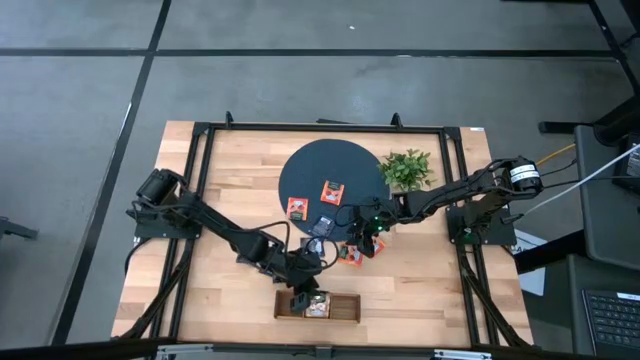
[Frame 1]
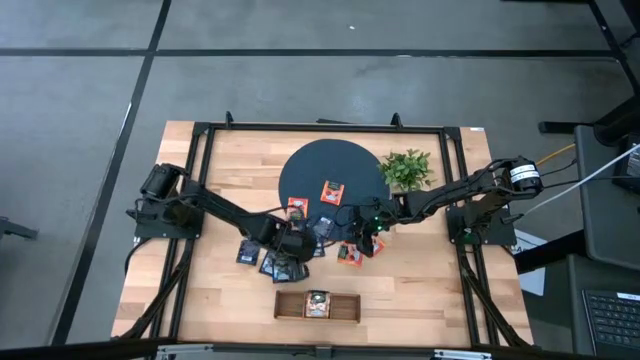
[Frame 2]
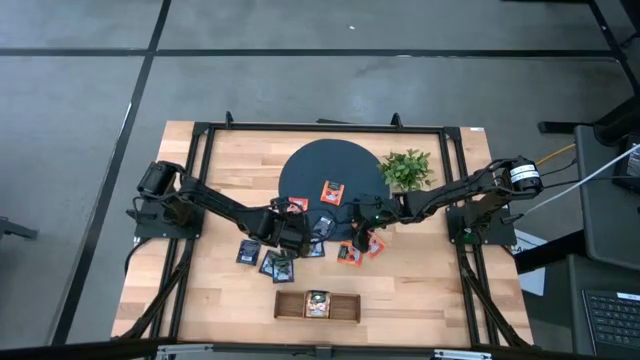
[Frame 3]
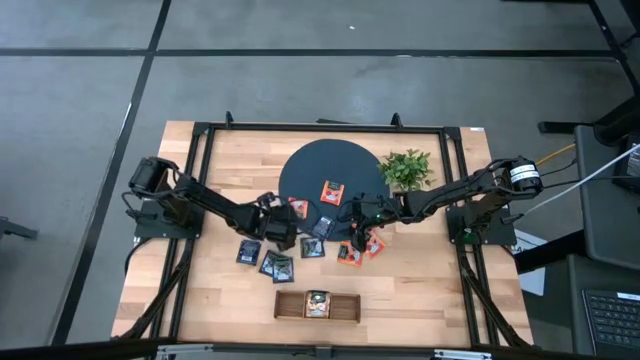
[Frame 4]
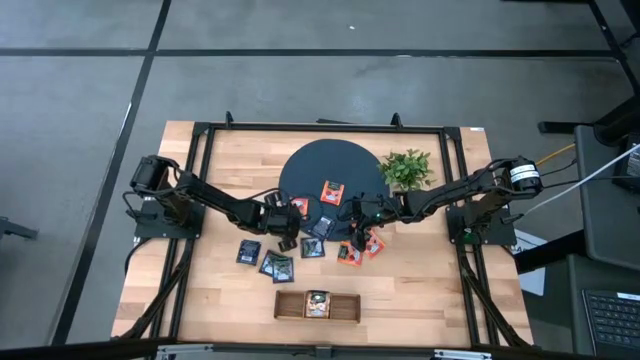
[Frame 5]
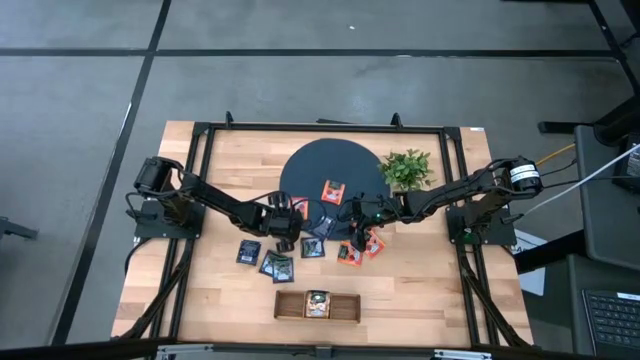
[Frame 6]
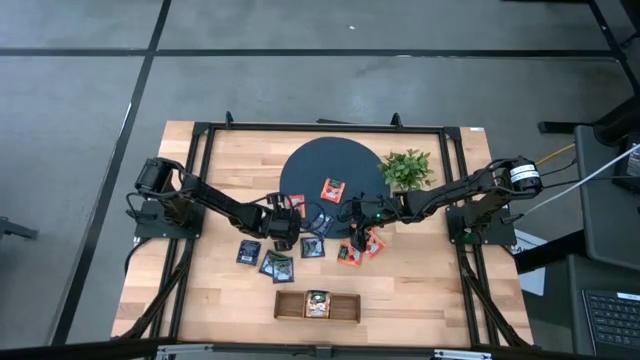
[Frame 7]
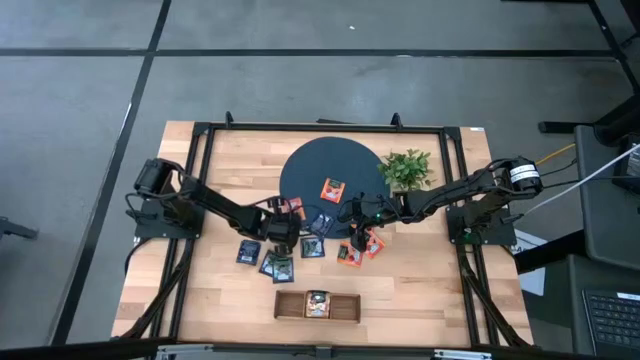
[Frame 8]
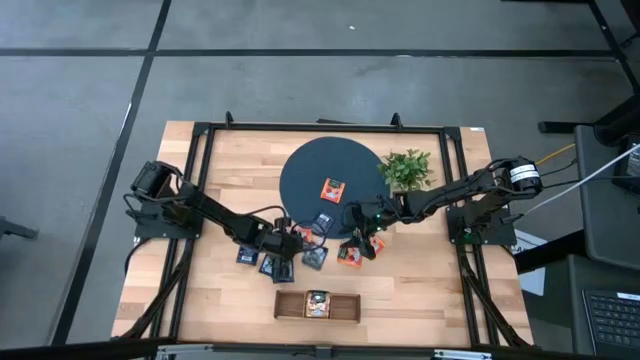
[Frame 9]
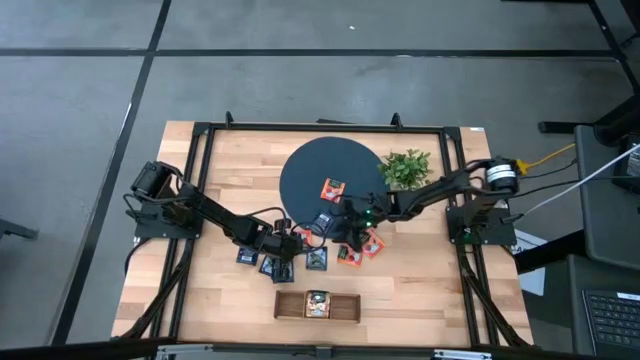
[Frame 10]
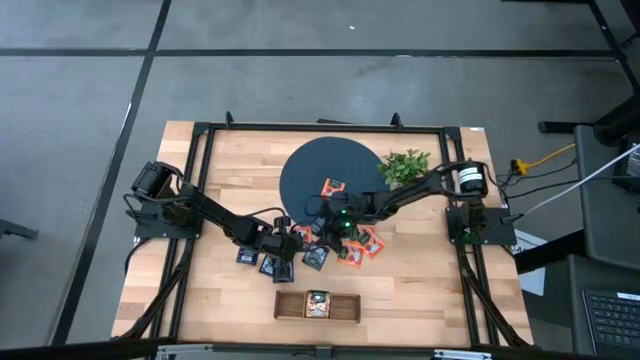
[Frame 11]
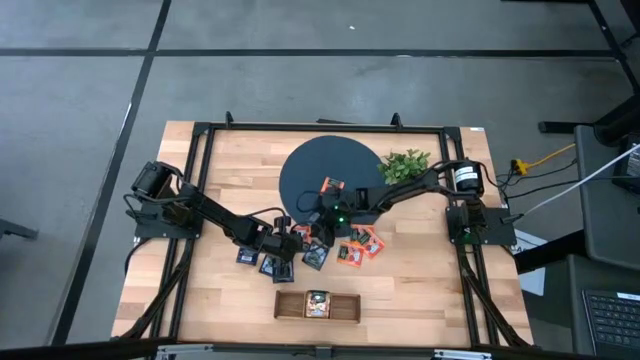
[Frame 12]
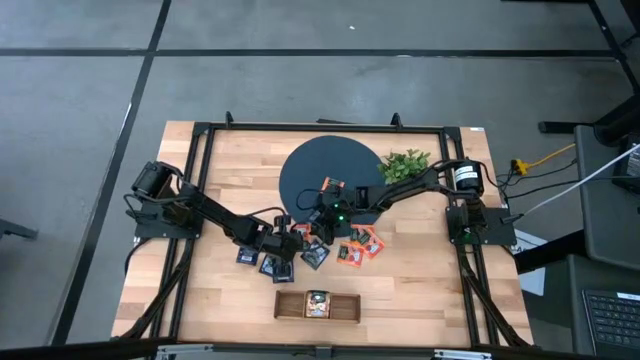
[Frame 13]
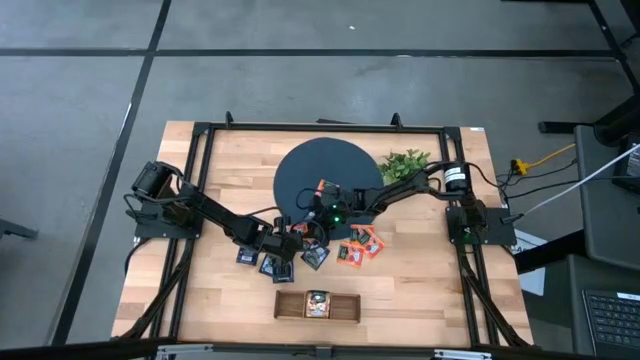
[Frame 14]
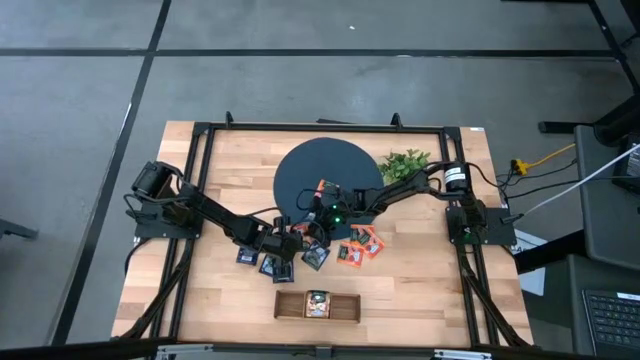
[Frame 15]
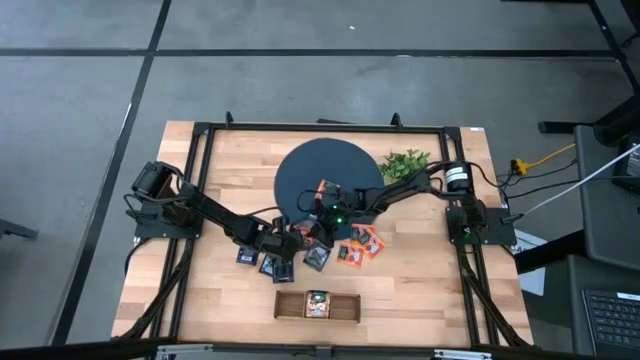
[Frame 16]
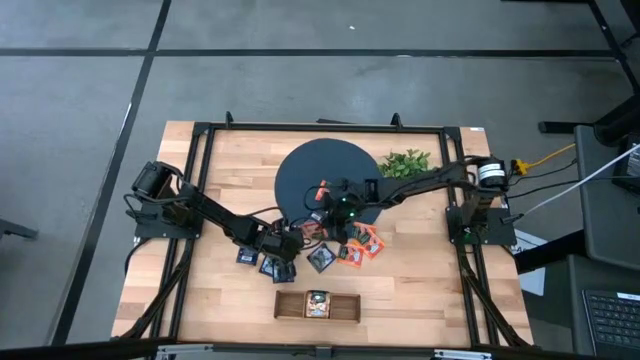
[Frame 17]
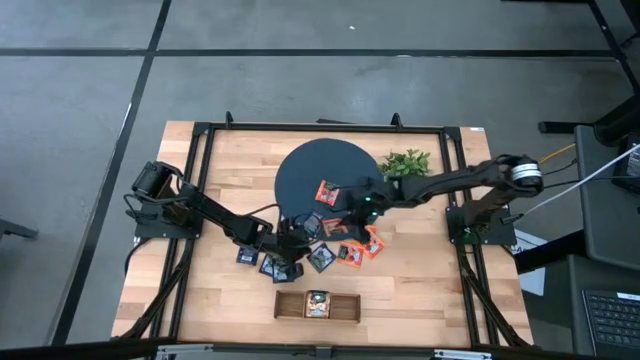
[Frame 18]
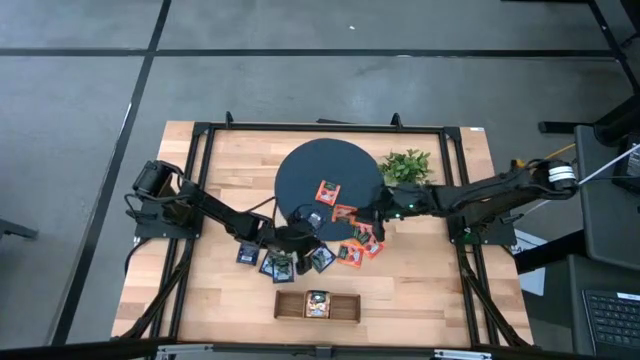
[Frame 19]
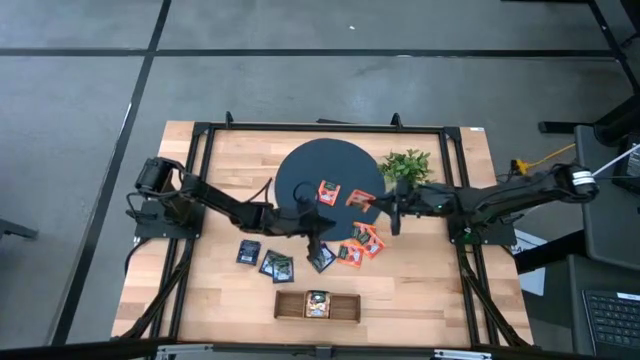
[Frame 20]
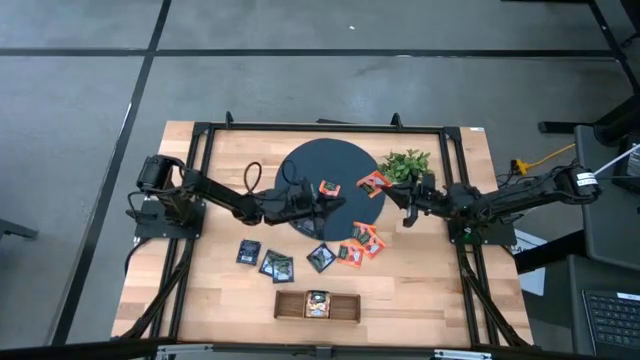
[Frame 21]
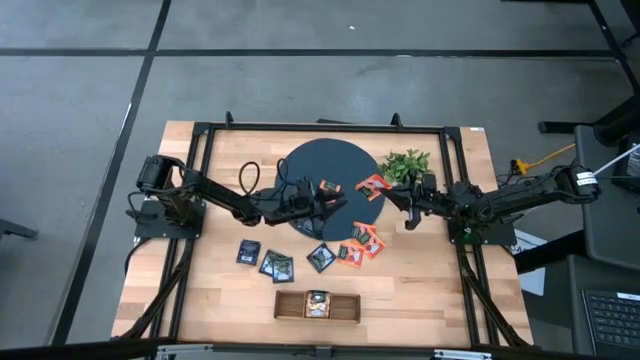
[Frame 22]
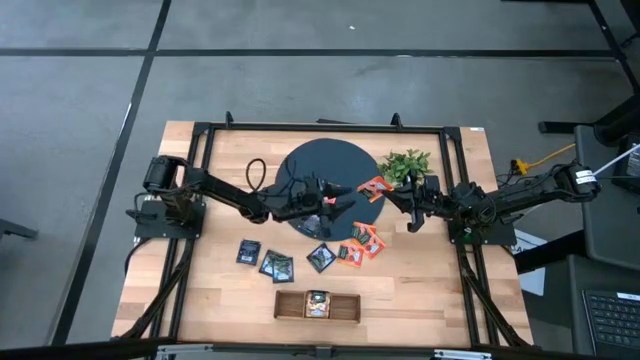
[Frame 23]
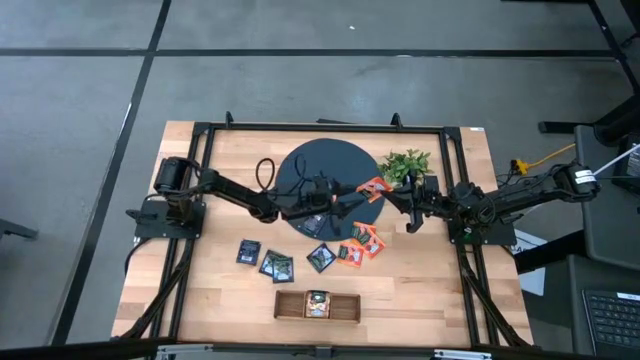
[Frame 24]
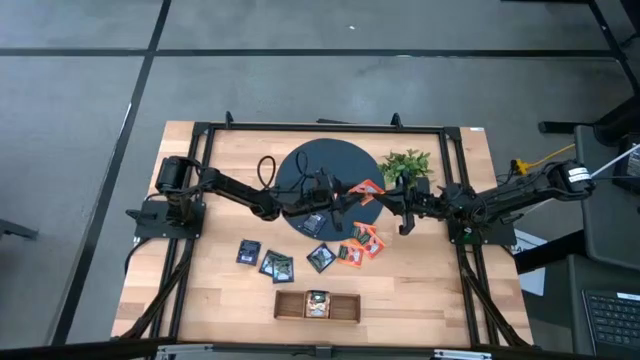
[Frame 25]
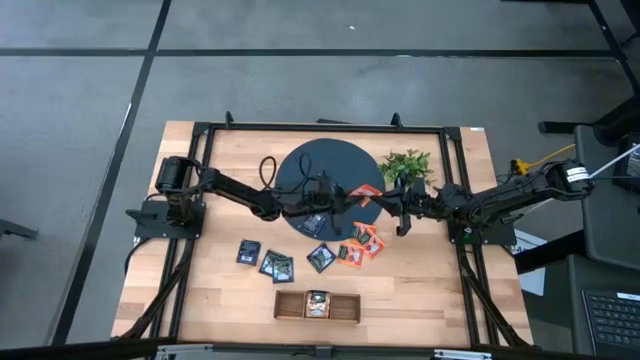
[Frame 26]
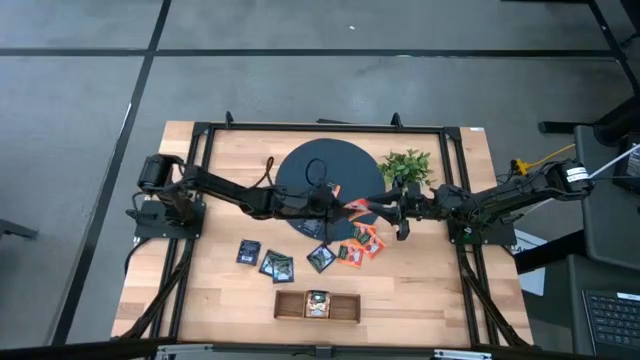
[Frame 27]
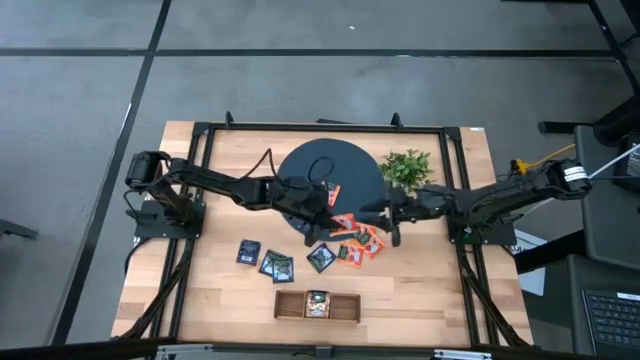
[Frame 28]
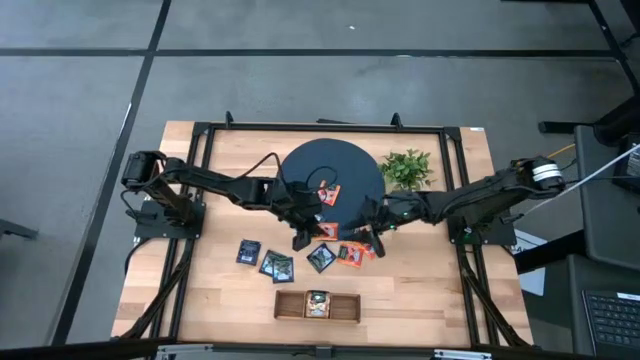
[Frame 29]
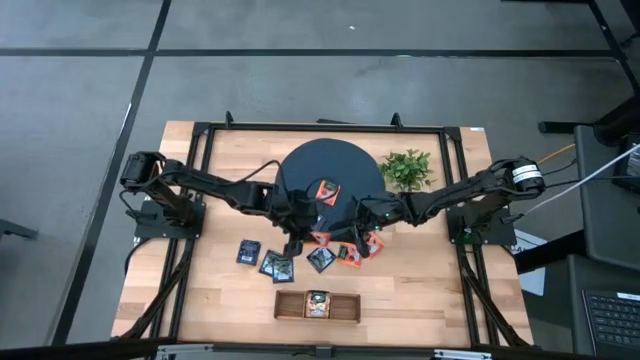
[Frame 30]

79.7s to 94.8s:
Task: Pick & Place Tea
Put the orange tea bag into the right section of the wooden organizer
